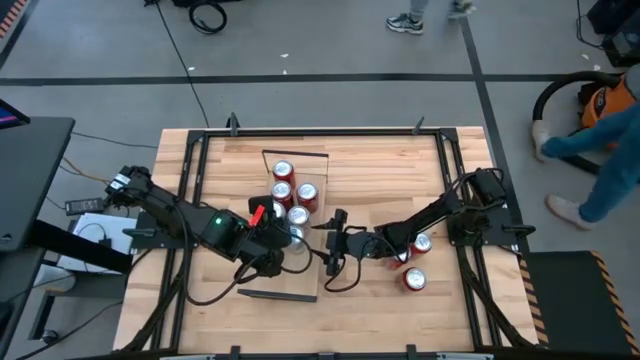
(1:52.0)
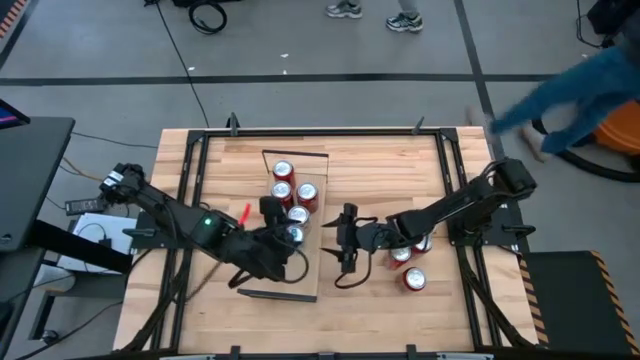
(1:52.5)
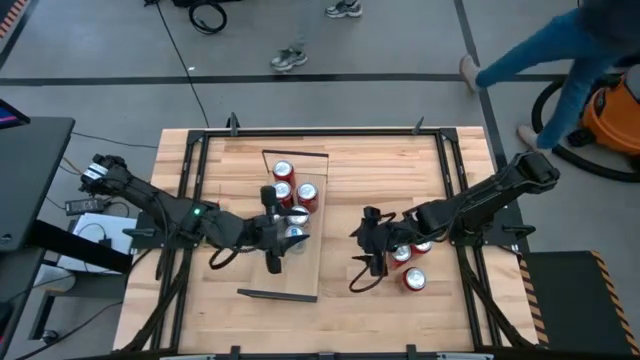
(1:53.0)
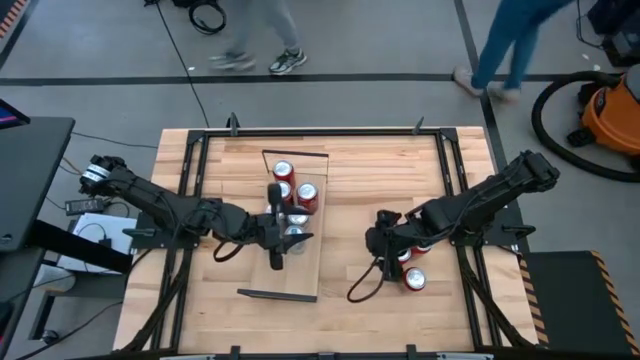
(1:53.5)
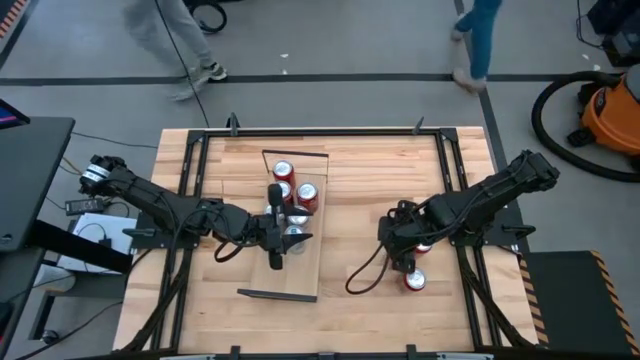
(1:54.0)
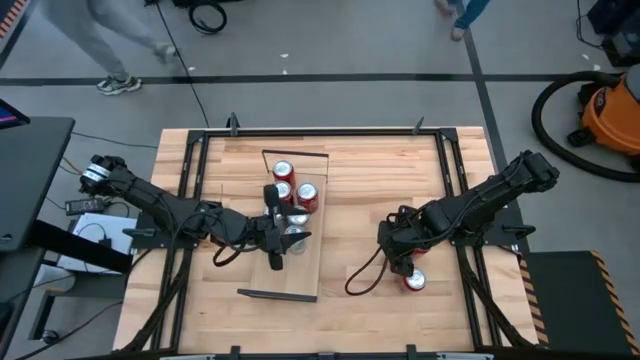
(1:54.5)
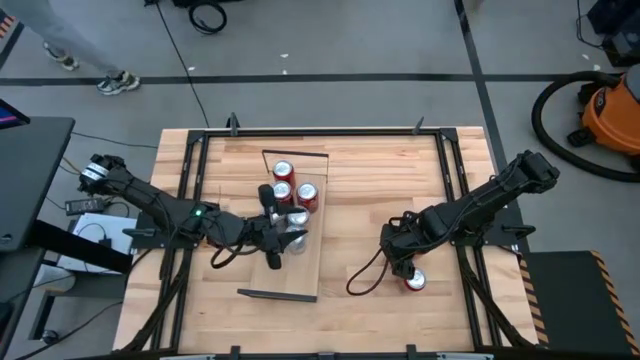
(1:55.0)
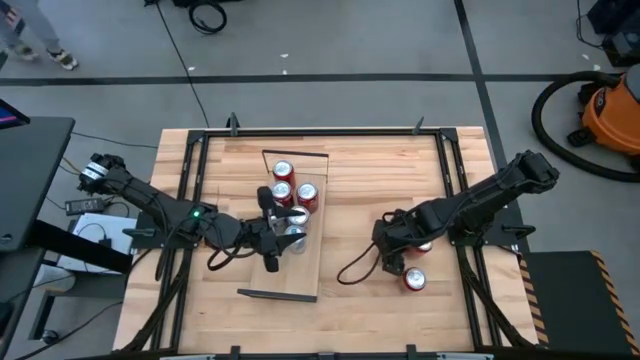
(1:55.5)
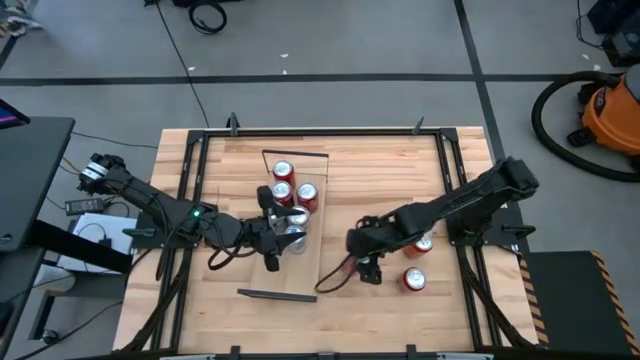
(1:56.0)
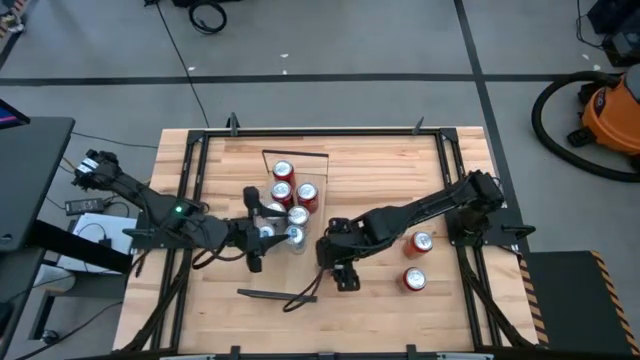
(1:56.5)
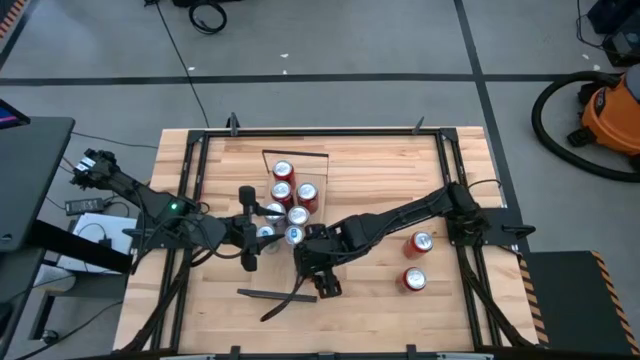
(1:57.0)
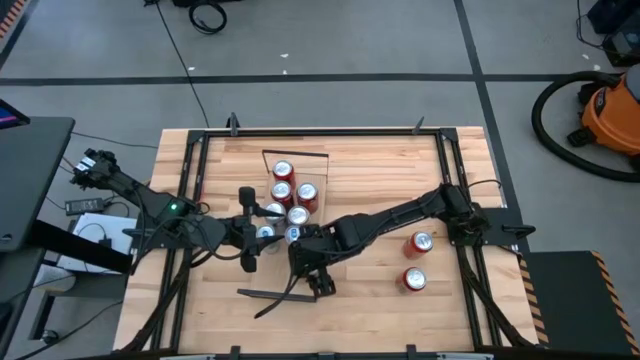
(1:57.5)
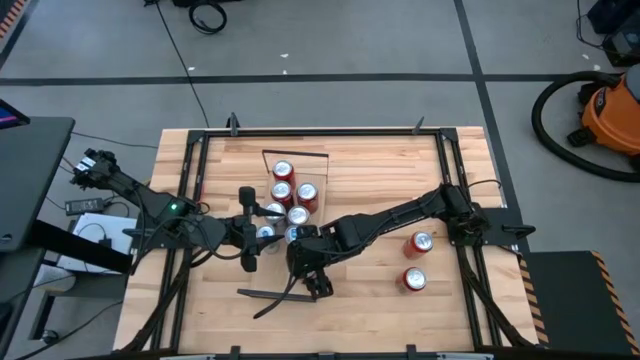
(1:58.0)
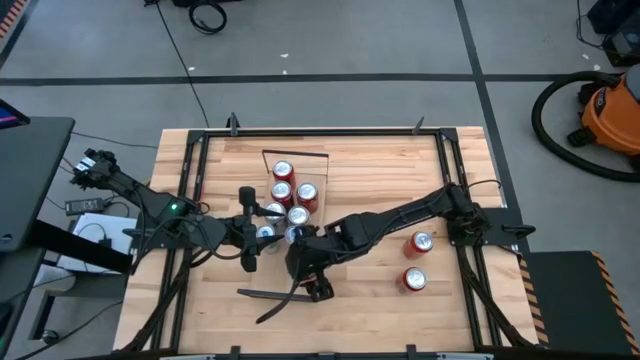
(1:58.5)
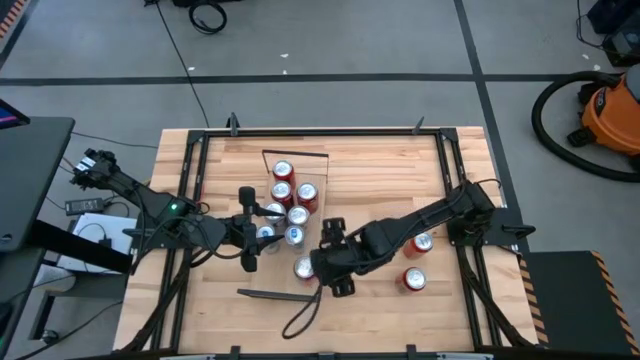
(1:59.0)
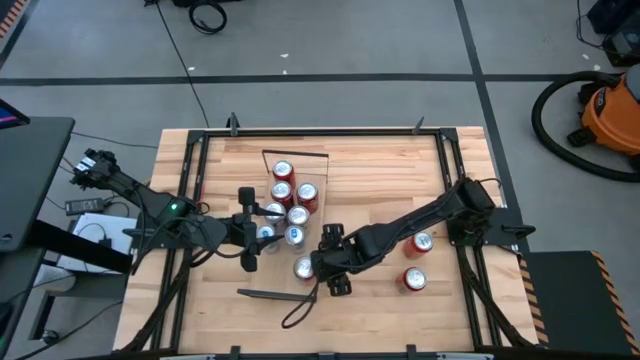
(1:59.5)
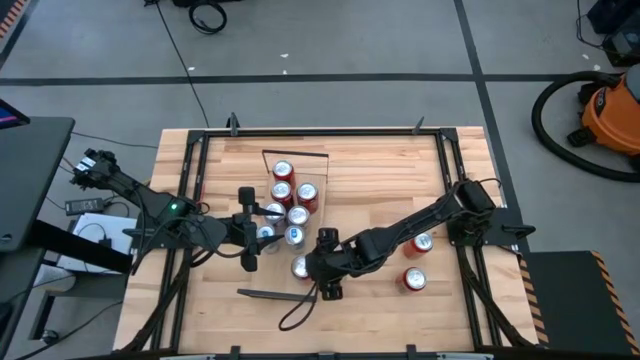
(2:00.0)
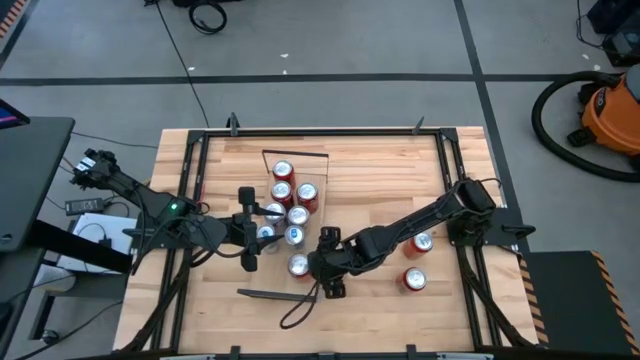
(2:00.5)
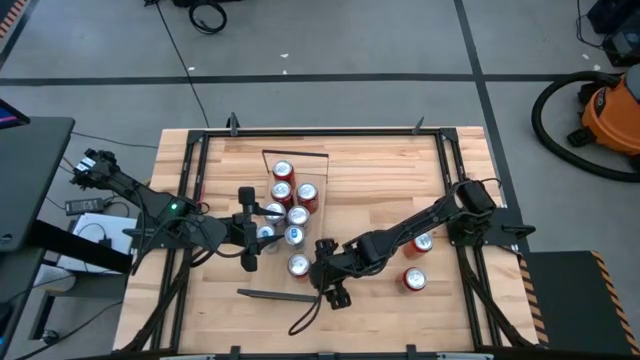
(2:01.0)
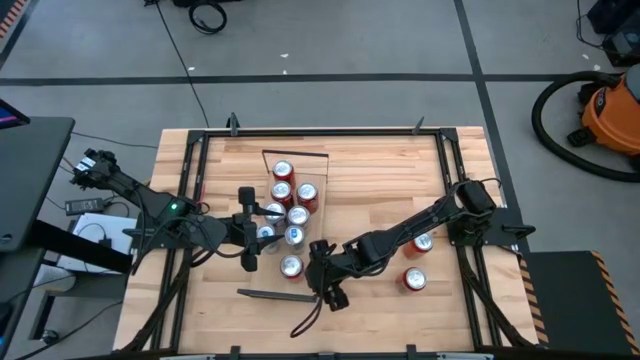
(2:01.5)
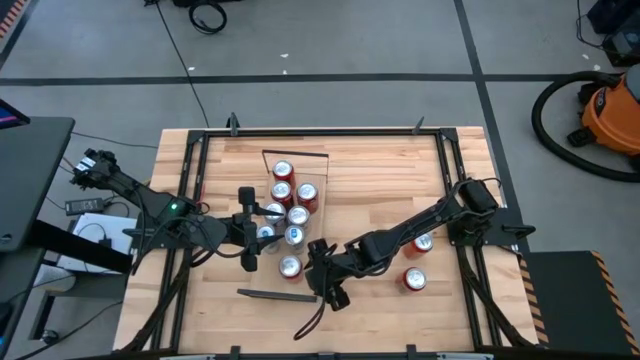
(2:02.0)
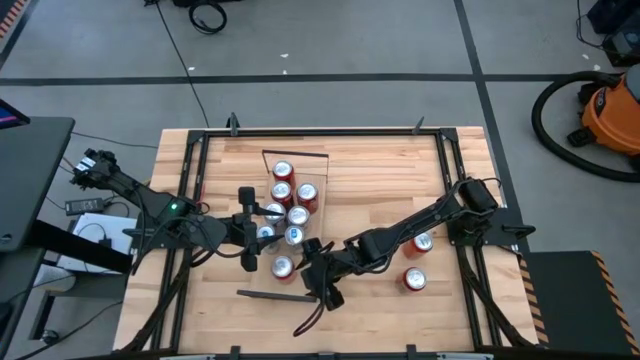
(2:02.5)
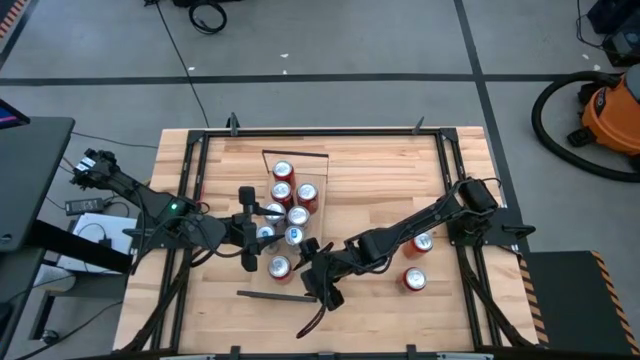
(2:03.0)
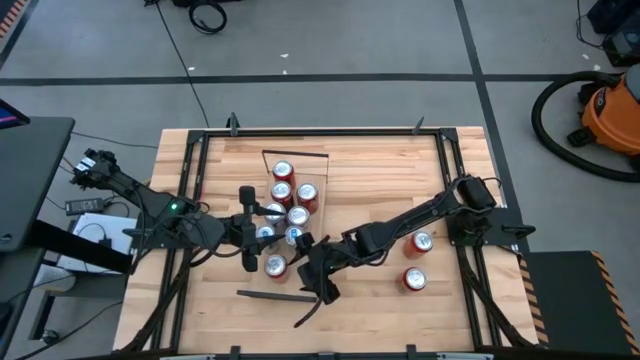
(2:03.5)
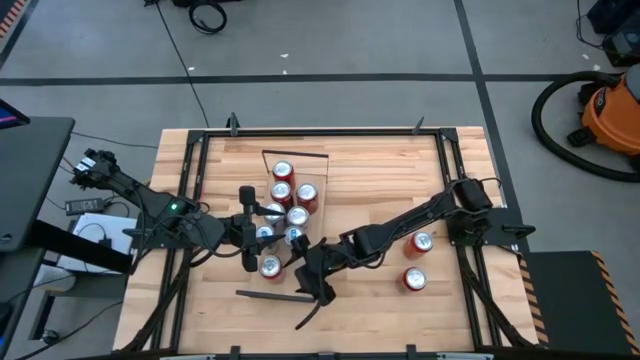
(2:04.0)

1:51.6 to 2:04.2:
Task: Place canned beverage on shelf
Put the left red soda can on the shelf

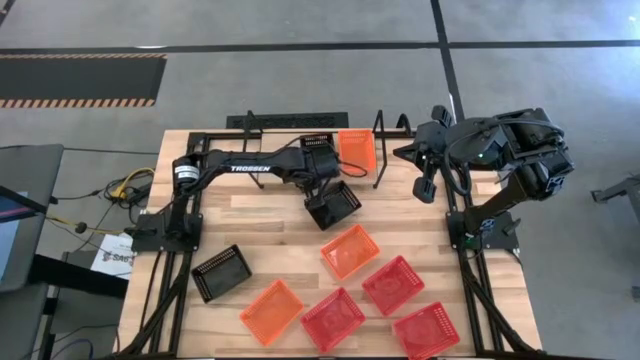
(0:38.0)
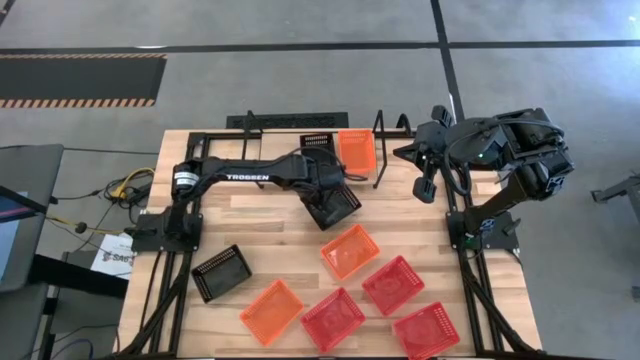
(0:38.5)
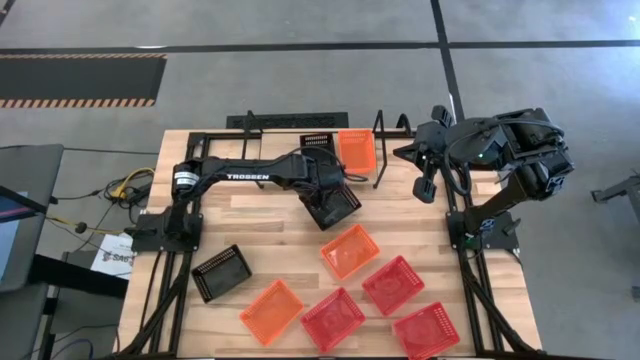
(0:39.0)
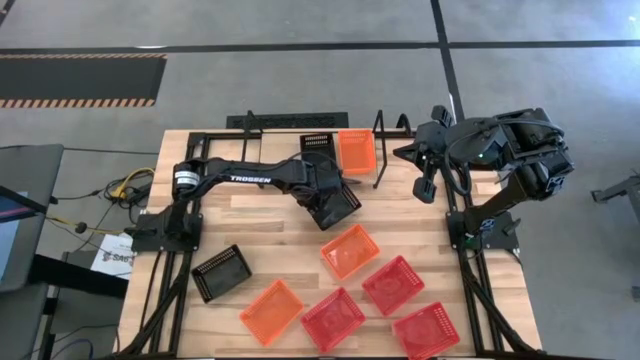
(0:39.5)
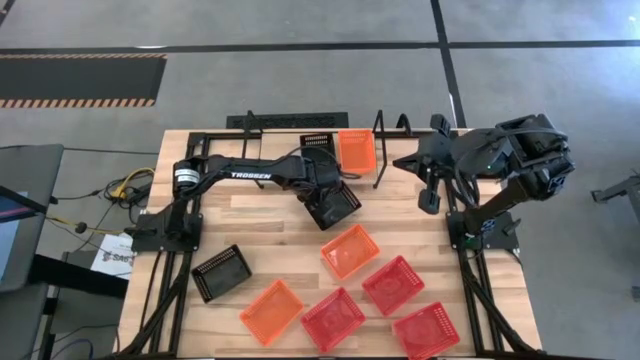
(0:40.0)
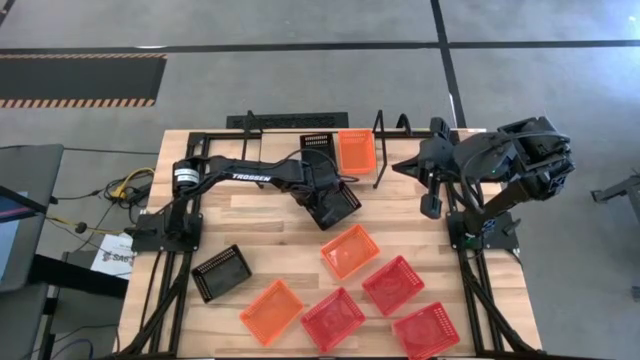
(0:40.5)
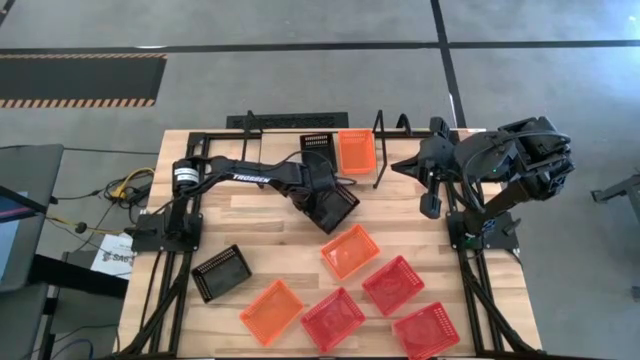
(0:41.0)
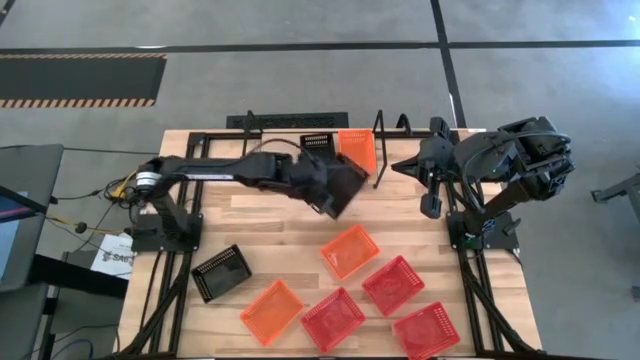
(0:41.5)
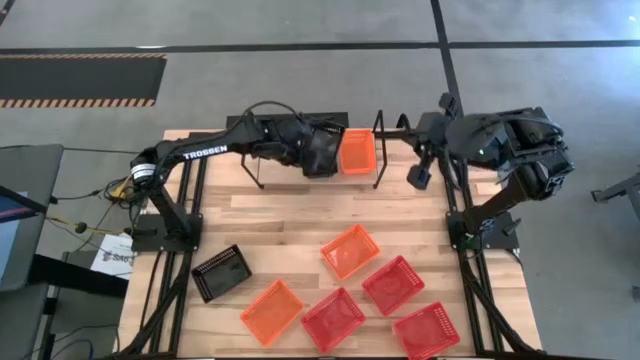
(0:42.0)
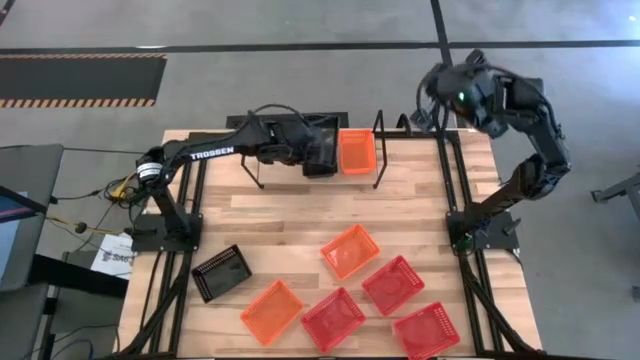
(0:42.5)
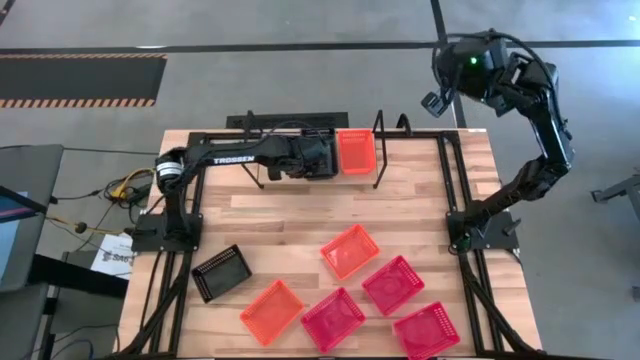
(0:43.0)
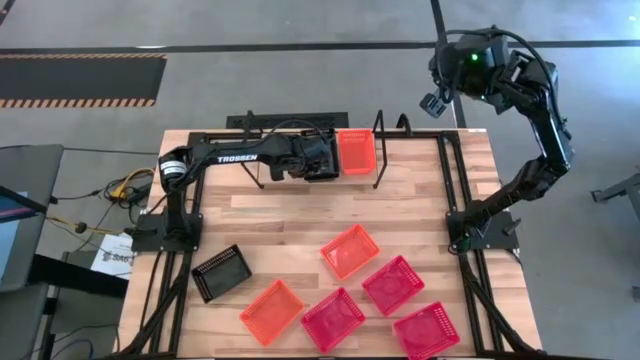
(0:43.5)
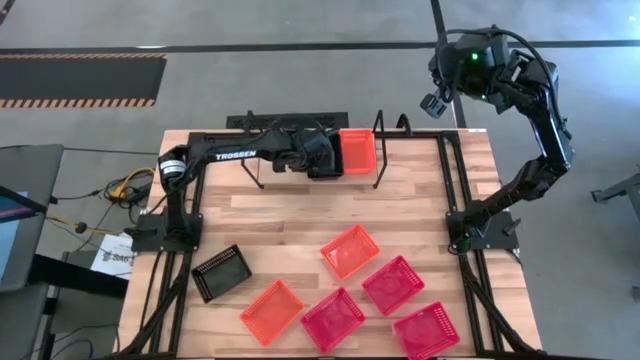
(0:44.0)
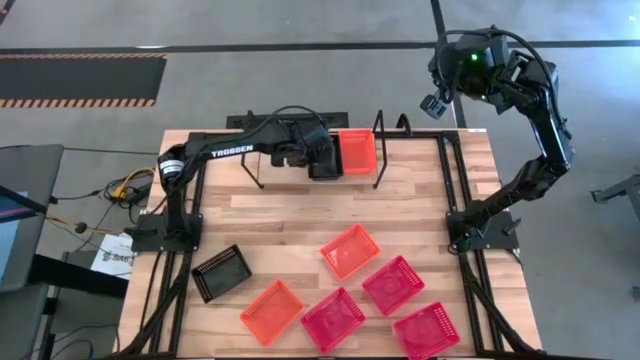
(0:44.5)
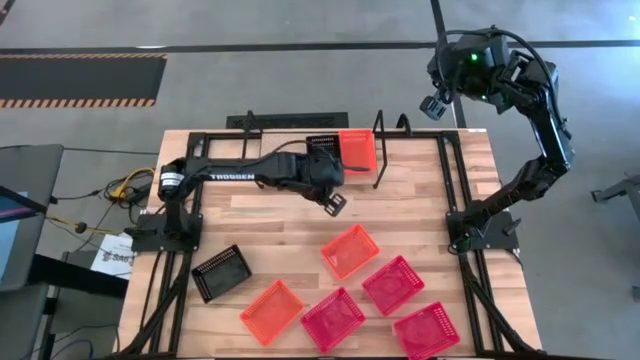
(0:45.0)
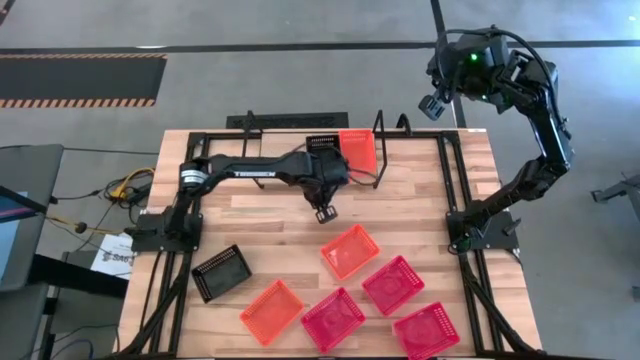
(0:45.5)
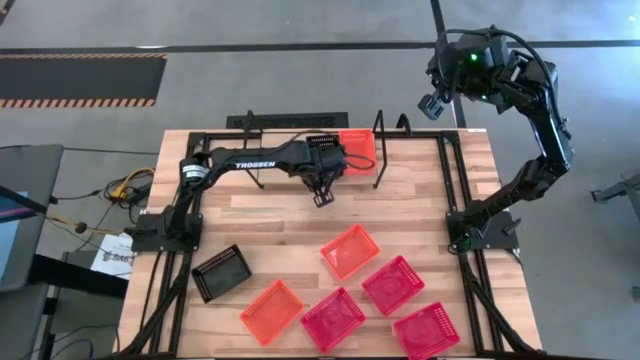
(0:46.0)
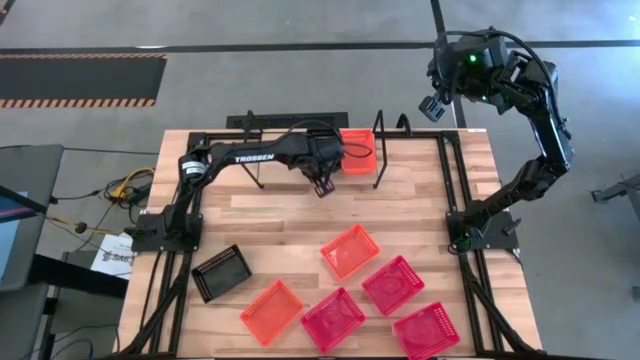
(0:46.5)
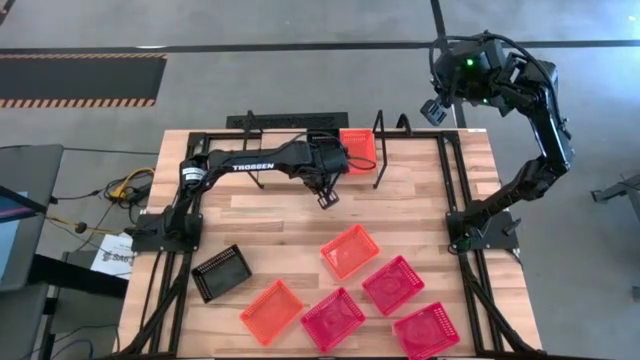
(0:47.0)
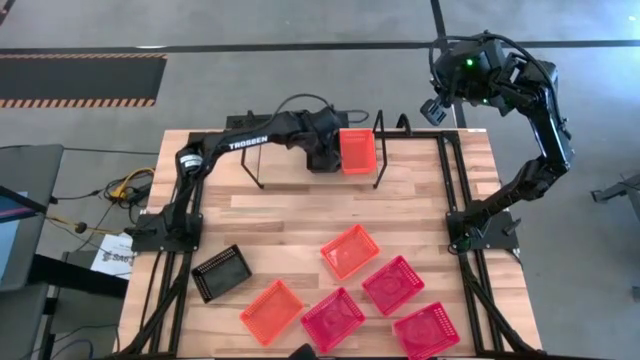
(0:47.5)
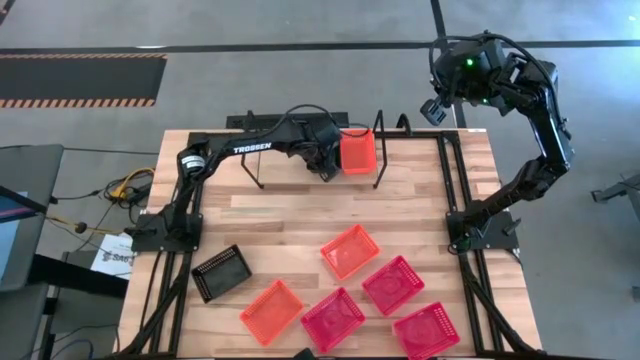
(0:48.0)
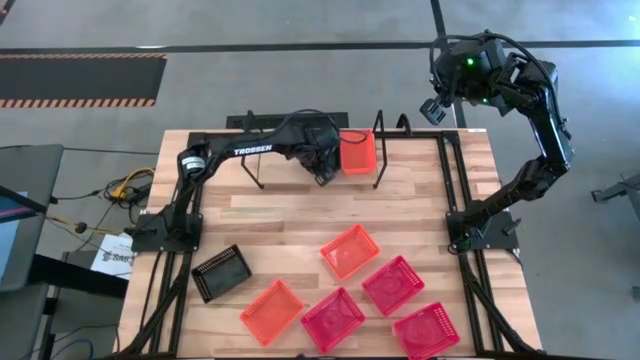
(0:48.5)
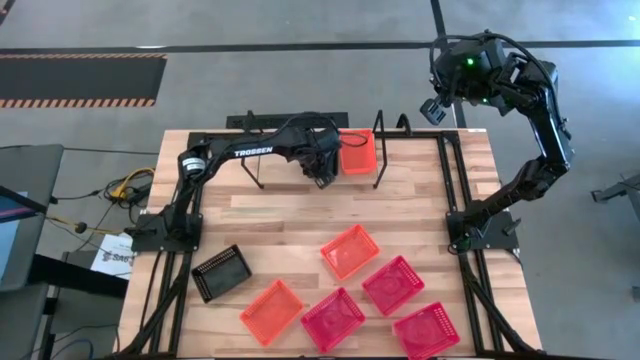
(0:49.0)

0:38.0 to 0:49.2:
Task: Stack baskets on shelf by color
Stack the top black bin on top of the black bin on the shelf
